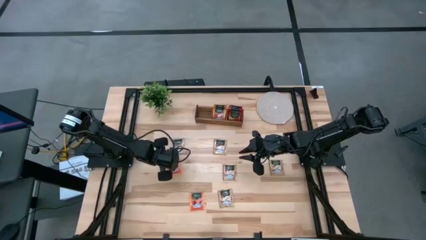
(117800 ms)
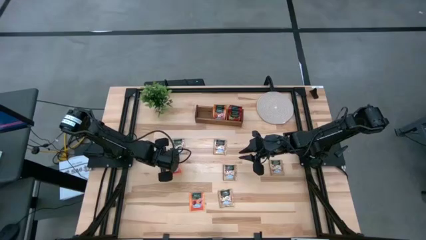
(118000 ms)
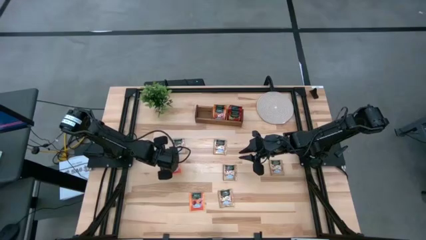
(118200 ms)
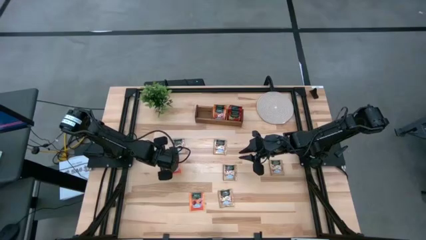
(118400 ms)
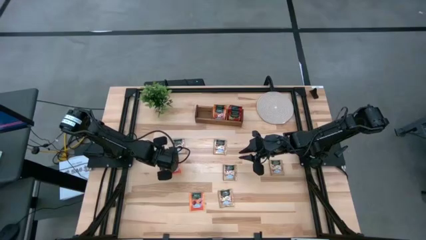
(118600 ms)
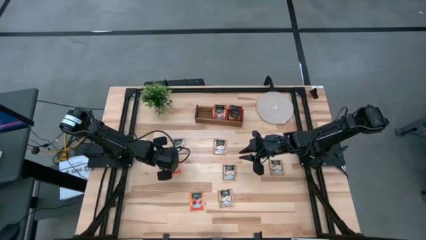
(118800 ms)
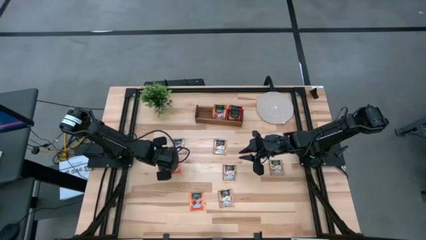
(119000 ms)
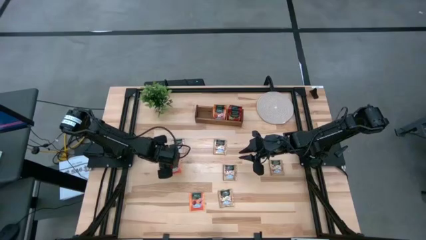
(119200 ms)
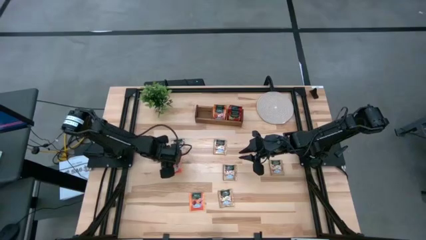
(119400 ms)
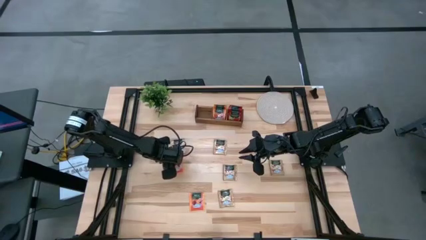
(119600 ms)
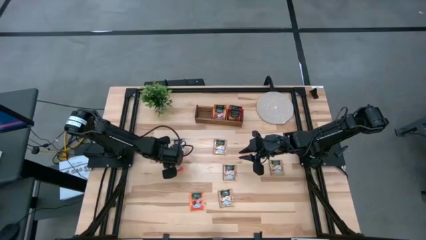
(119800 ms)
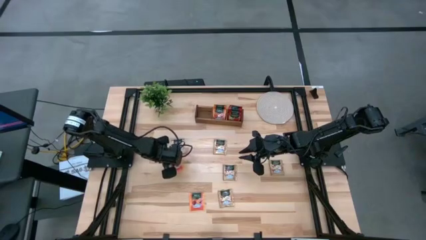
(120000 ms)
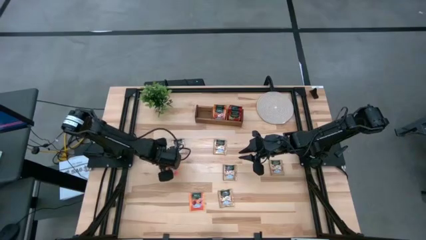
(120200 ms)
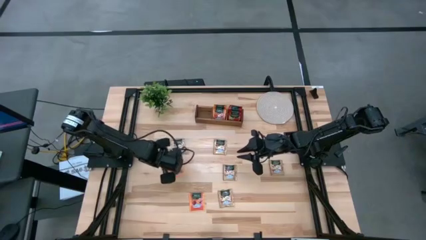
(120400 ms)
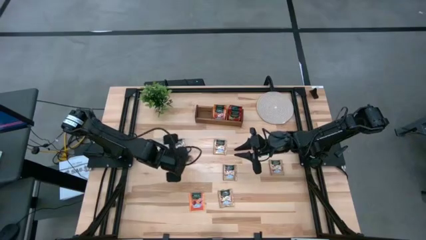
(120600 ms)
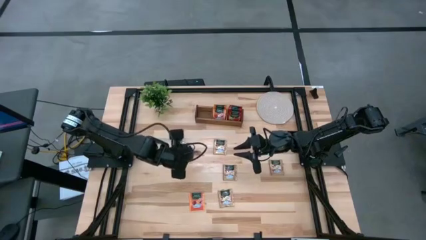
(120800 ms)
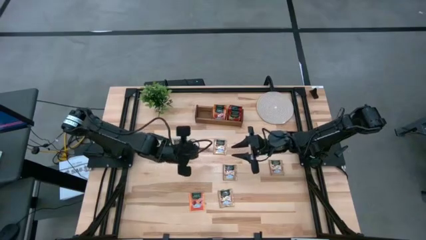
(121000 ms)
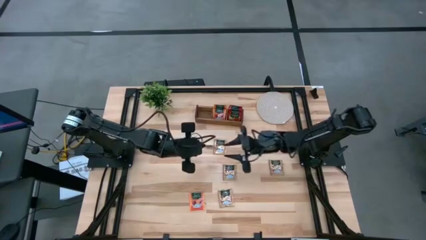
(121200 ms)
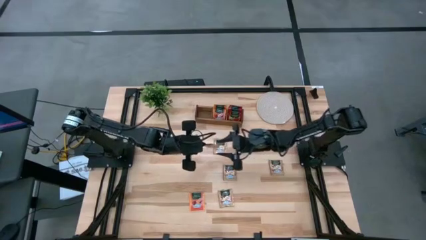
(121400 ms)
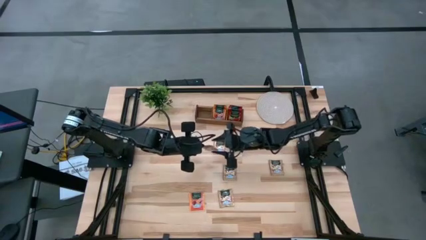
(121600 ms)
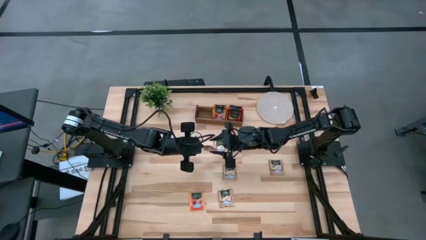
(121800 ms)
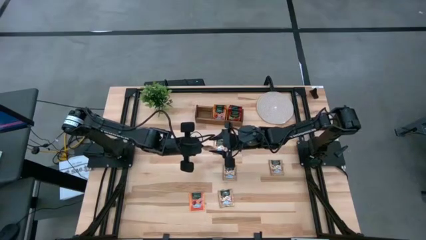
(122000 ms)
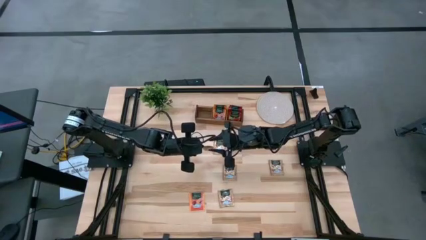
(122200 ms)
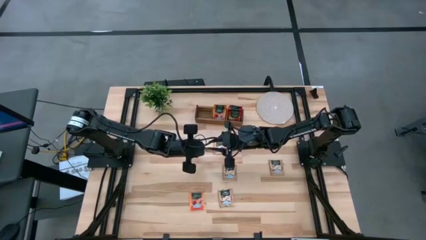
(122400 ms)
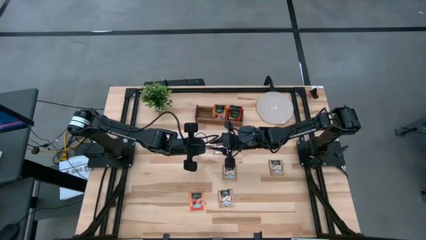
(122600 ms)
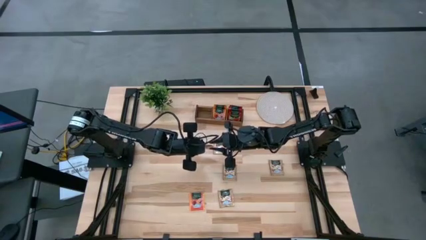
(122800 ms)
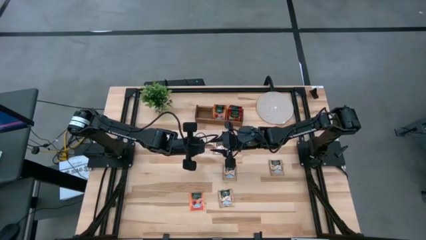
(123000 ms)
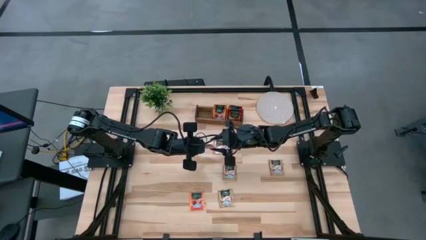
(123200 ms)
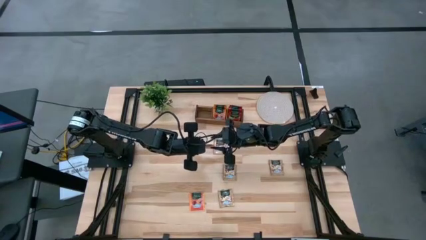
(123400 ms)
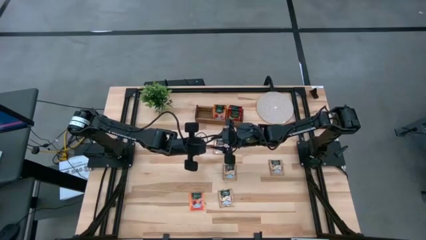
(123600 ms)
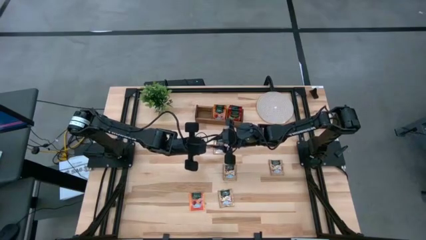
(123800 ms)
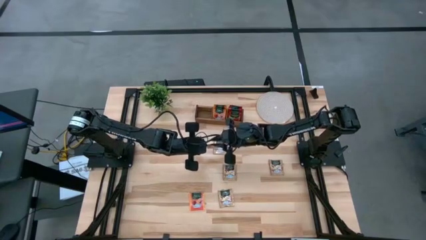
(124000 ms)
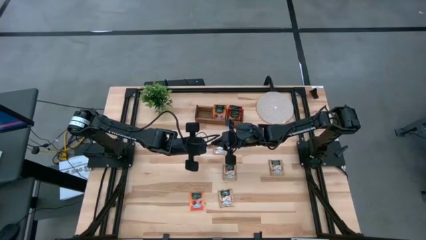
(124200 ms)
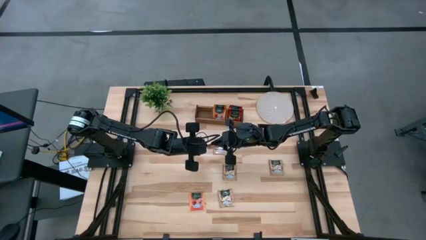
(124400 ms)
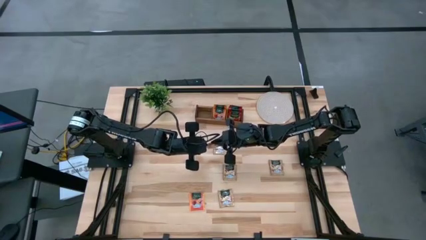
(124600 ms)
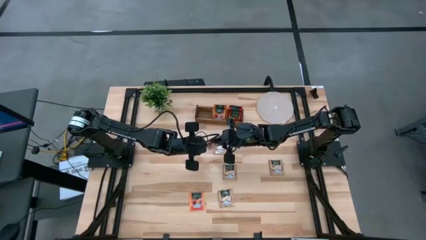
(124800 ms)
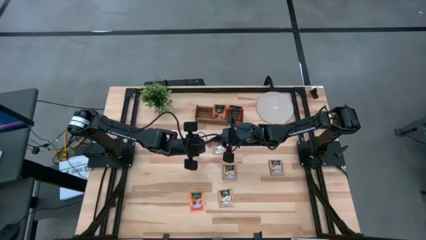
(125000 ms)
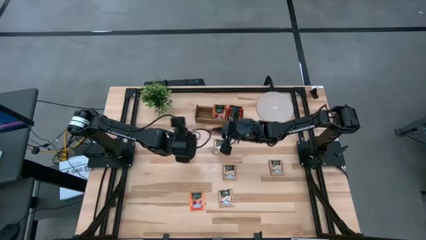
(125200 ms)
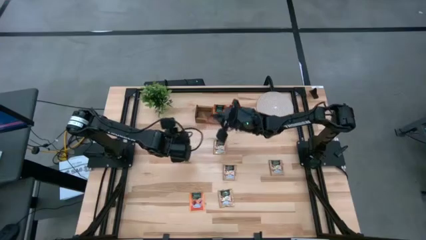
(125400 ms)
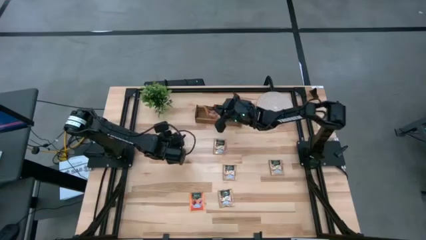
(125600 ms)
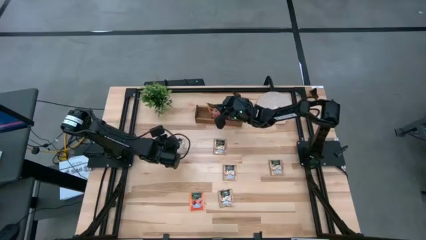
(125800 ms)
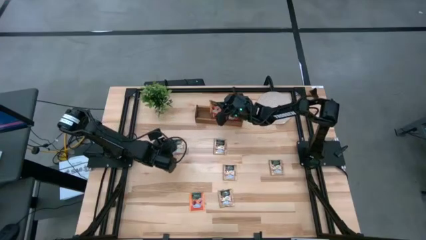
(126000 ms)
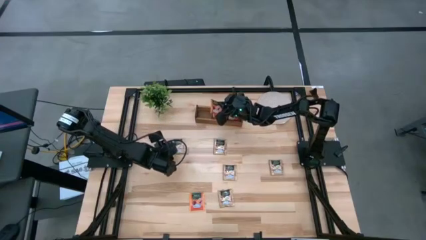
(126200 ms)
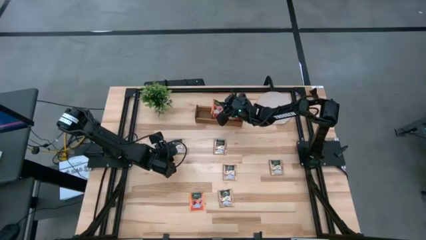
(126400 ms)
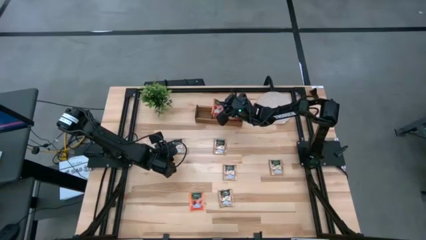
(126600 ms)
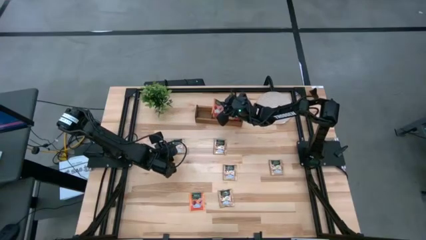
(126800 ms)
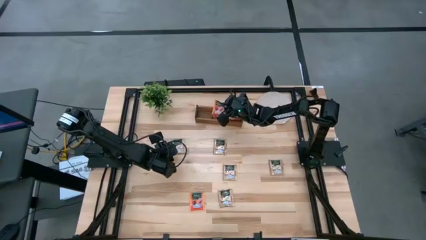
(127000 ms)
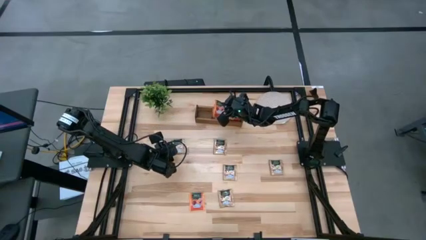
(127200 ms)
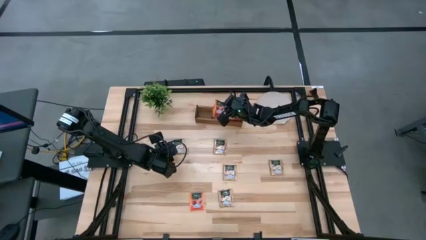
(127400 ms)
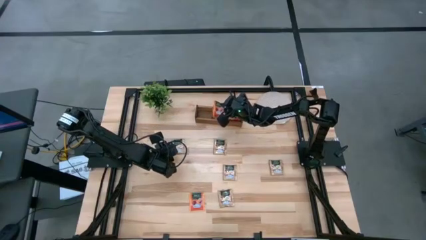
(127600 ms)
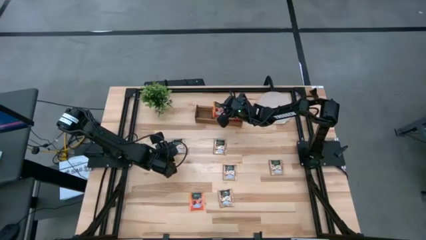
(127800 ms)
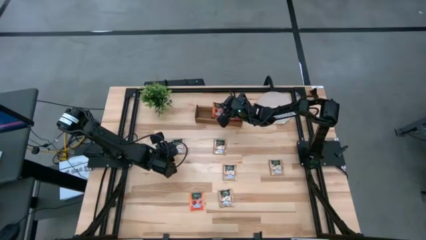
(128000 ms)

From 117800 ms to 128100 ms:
Task: Pick & Place Tea
Put the orange tea bag into the middle section of the wooden organizer
